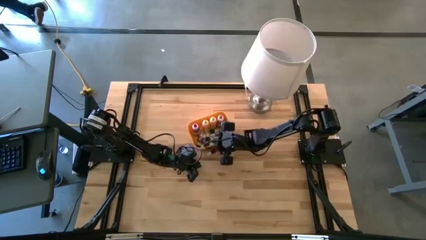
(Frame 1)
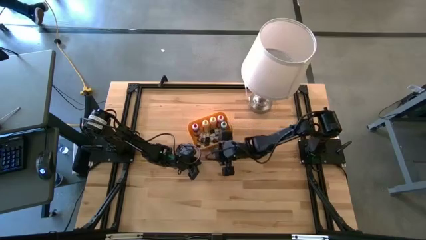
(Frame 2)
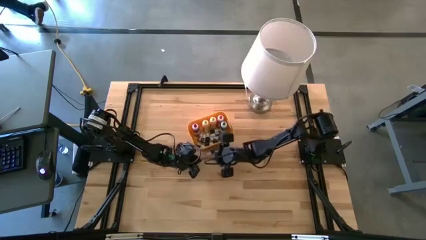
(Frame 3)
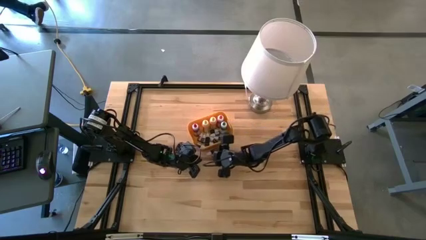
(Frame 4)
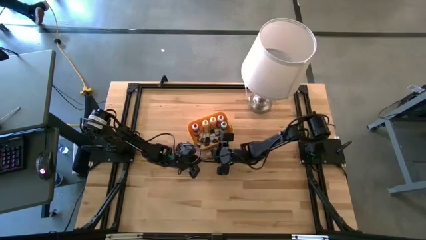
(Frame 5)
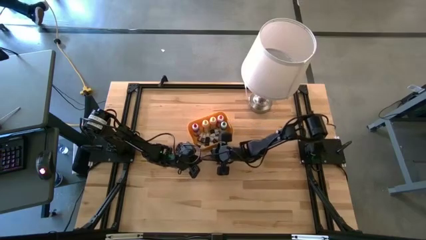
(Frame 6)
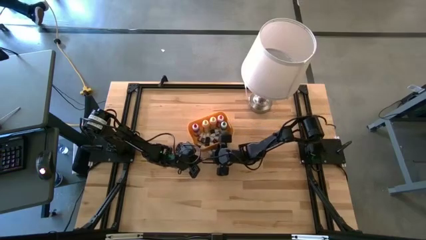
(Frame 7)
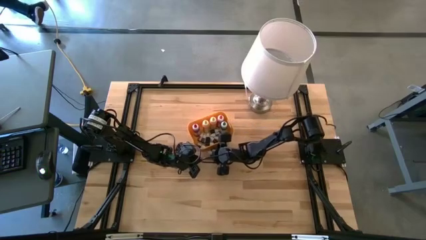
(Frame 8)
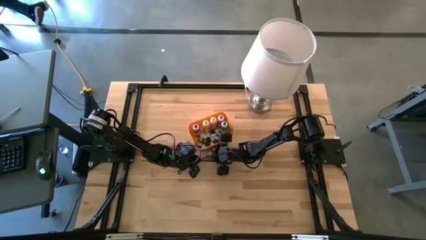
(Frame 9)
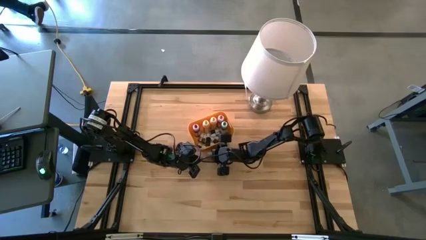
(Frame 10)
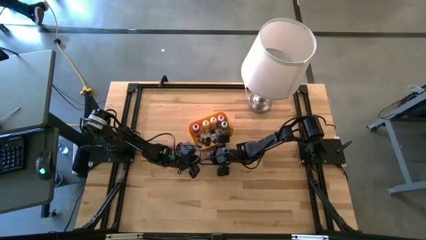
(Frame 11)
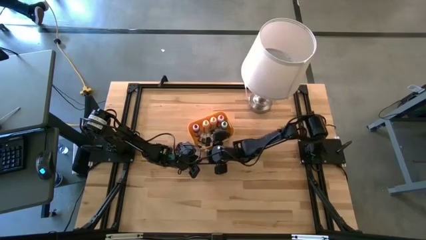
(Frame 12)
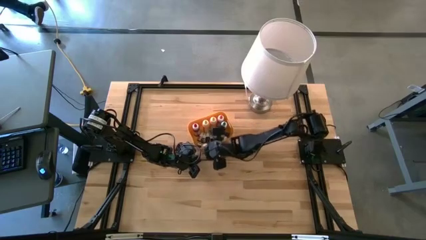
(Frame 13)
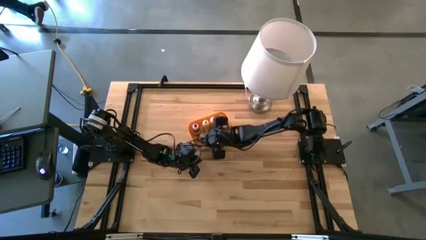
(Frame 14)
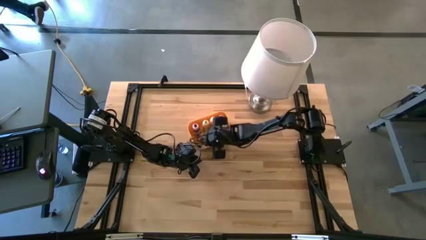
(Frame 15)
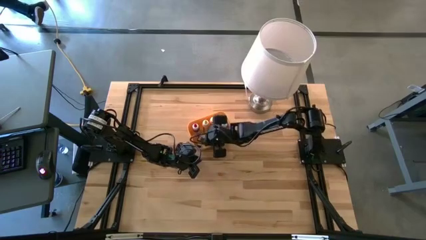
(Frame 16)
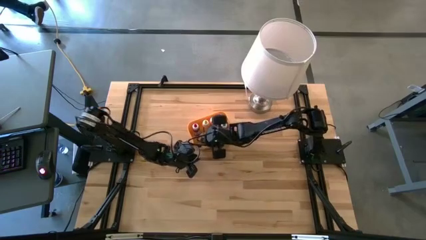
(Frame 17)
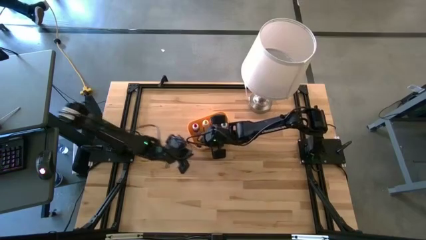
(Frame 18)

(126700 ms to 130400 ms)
Task: Pick & Place food coloring
Put the small red food coloring bottle into the yellow bin

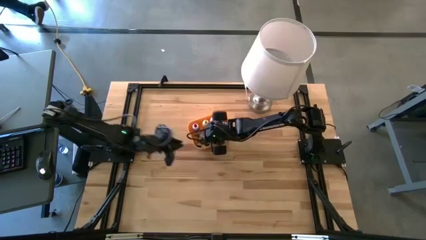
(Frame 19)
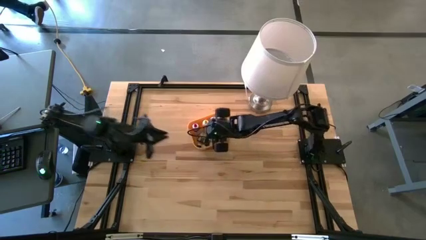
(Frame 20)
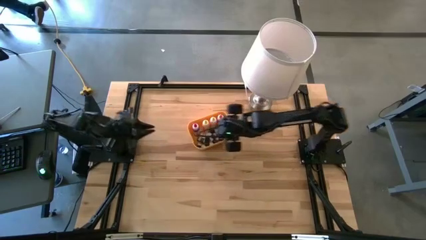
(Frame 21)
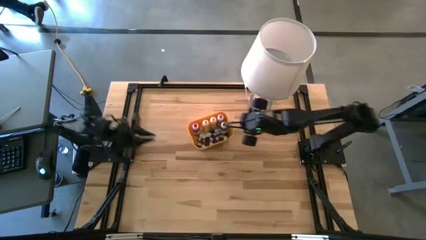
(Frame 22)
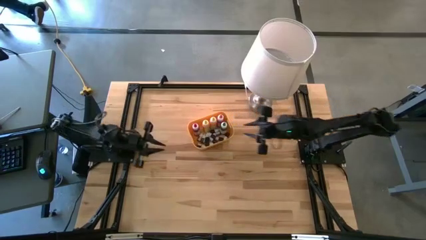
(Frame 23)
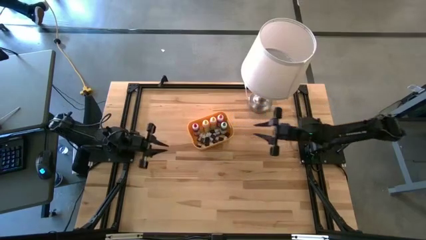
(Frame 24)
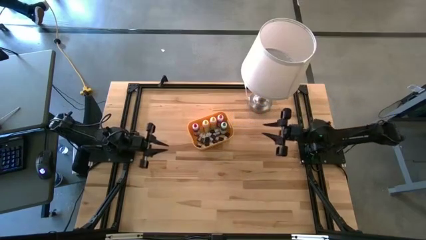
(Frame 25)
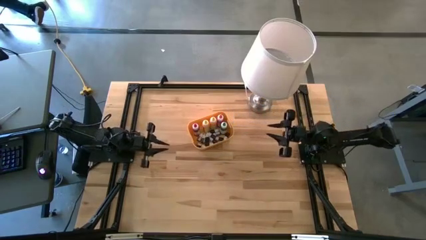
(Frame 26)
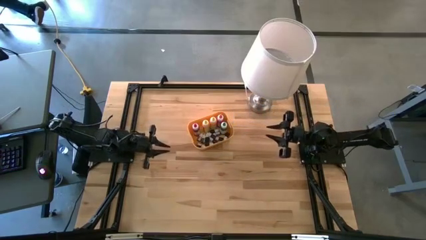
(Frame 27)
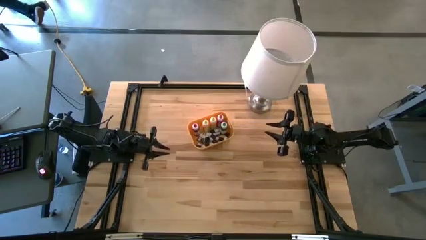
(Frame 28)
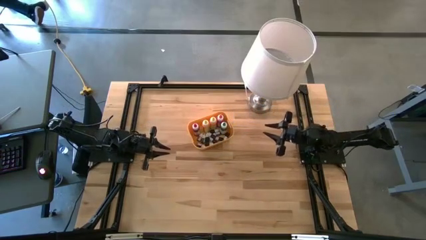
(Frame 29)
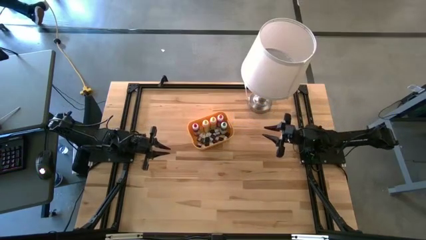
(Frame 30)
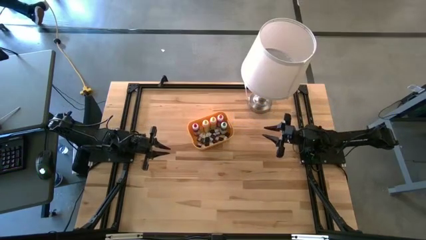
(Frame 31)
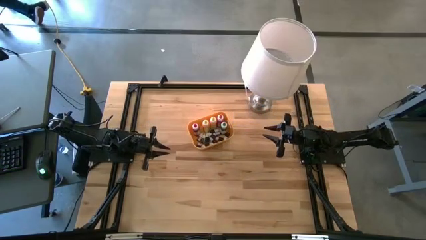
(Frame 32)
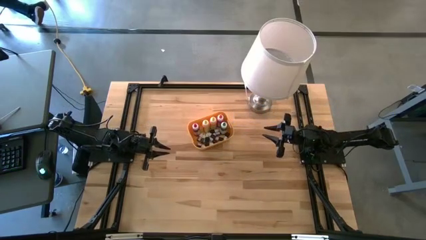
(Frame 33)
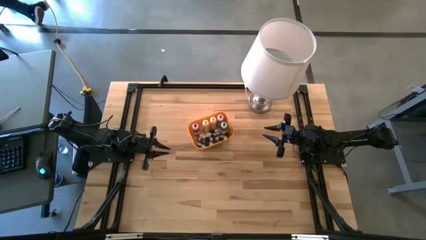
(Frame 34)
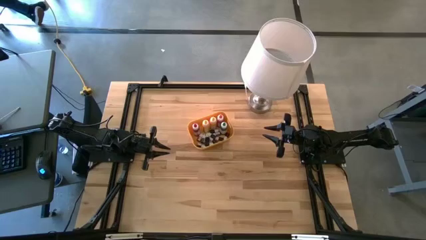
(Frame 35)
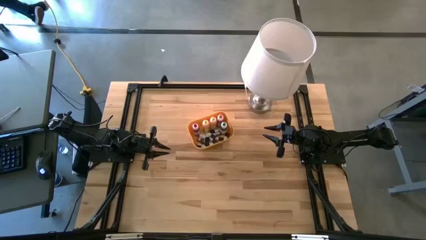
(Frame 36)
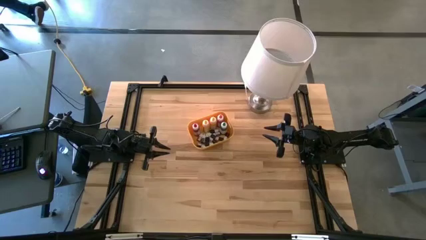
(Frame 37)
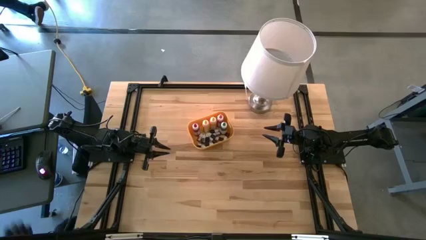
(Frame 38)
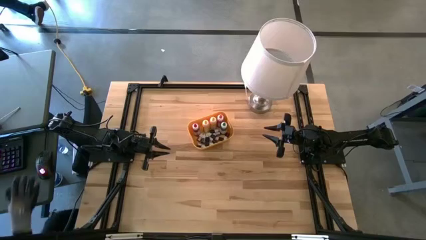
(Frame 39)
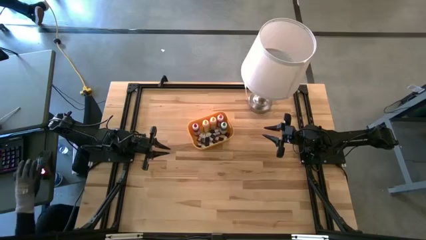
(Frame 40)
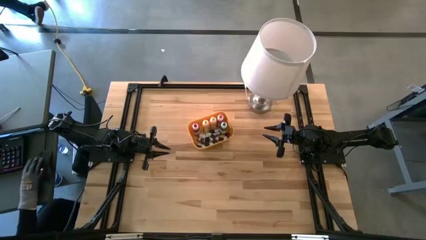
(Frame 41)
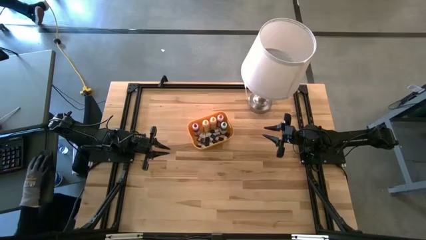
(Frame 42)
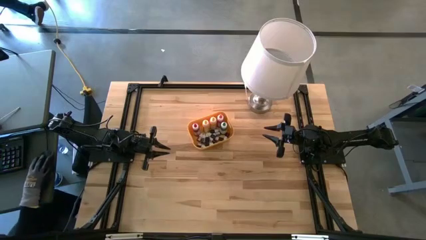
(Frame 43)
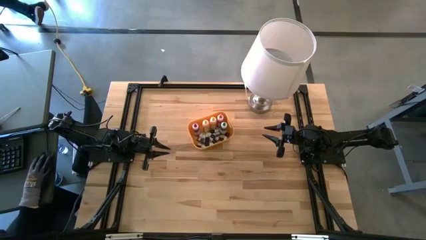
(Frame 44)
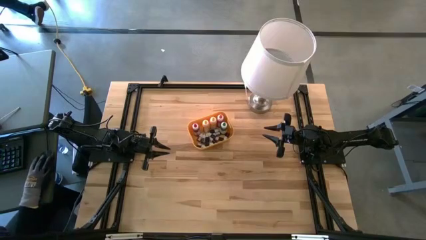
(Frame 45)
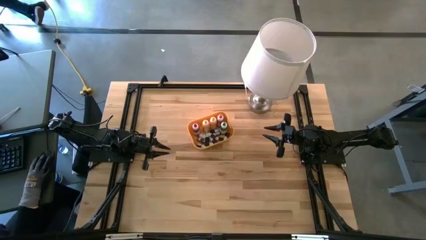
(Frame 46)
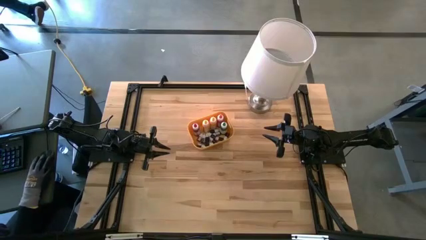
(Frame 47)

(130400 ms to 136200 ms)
Return to Home Position

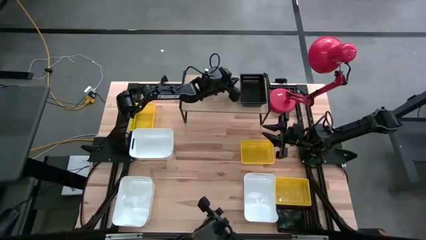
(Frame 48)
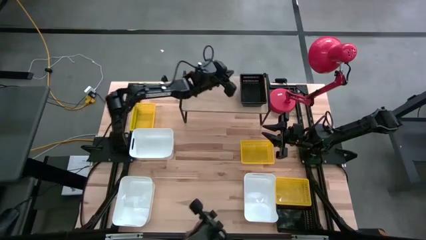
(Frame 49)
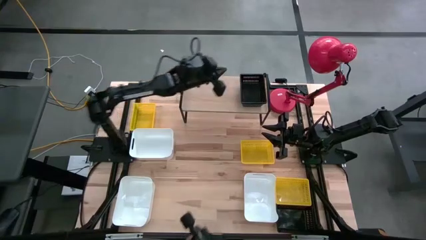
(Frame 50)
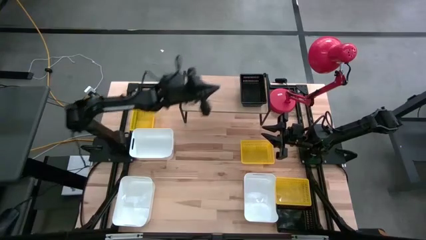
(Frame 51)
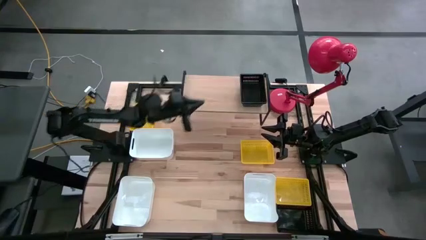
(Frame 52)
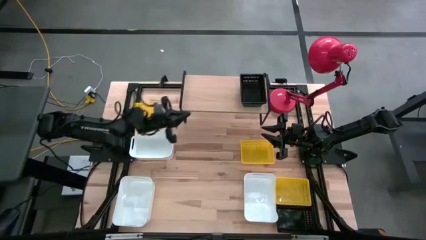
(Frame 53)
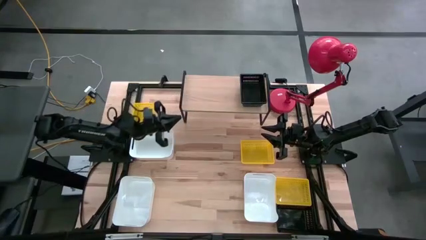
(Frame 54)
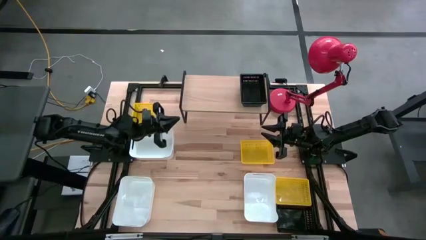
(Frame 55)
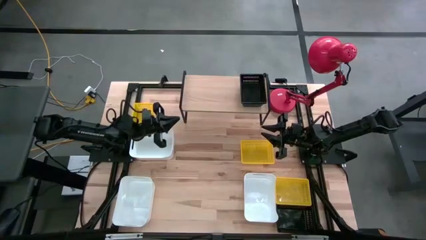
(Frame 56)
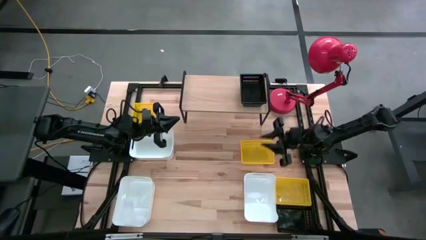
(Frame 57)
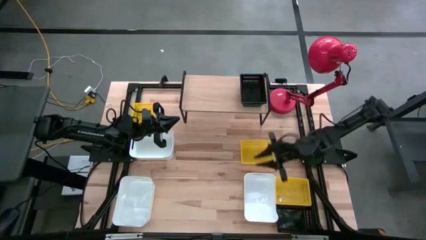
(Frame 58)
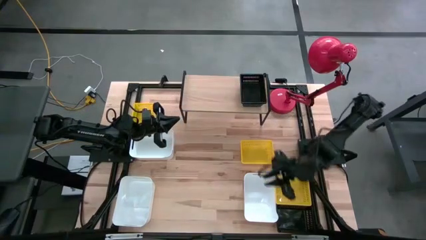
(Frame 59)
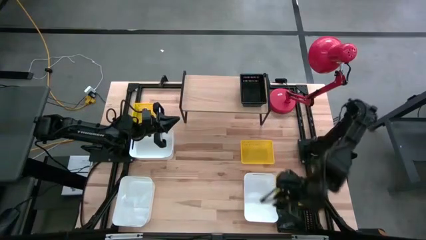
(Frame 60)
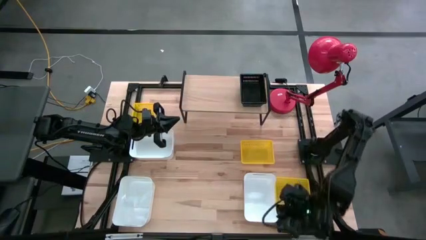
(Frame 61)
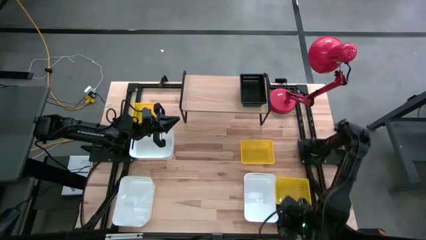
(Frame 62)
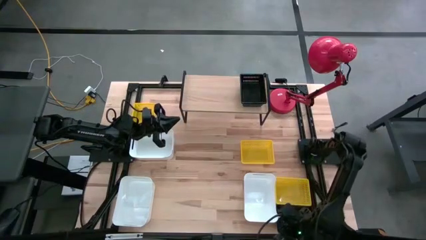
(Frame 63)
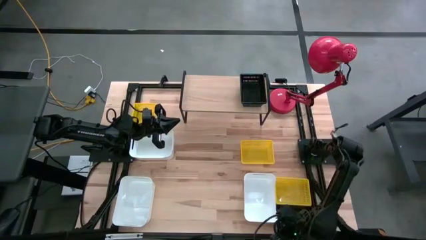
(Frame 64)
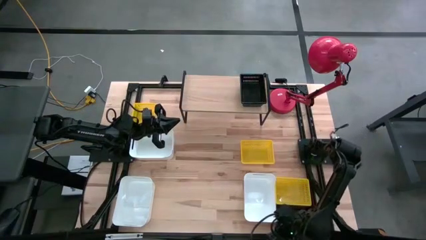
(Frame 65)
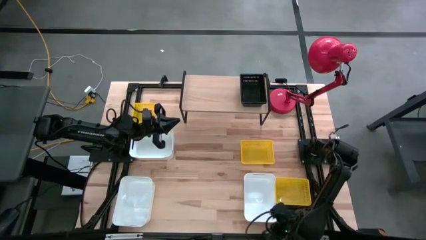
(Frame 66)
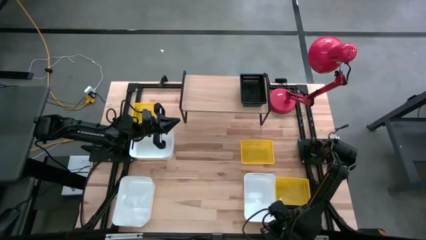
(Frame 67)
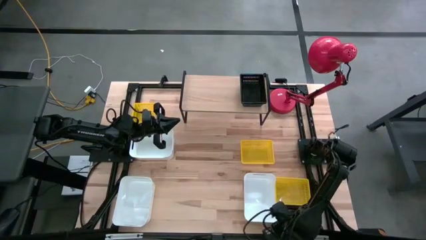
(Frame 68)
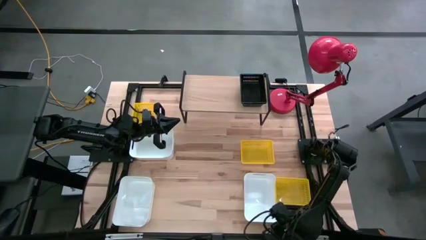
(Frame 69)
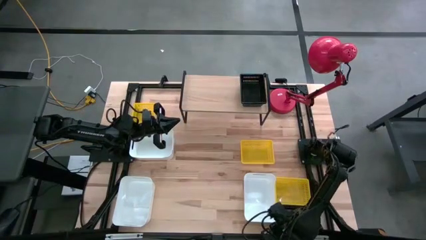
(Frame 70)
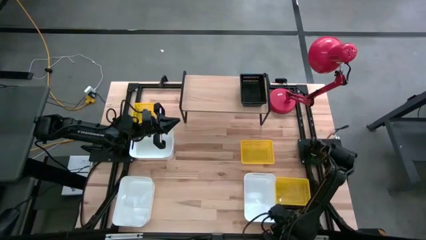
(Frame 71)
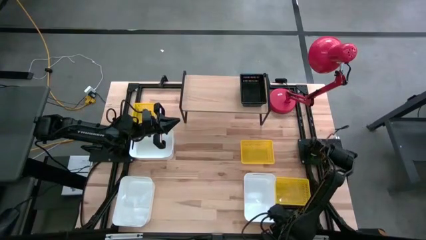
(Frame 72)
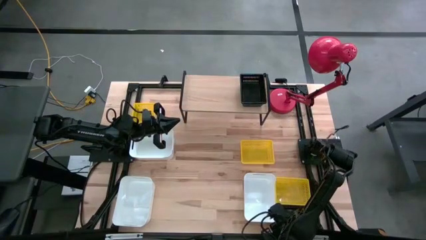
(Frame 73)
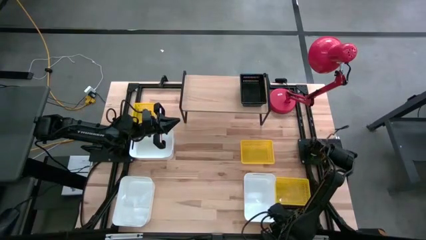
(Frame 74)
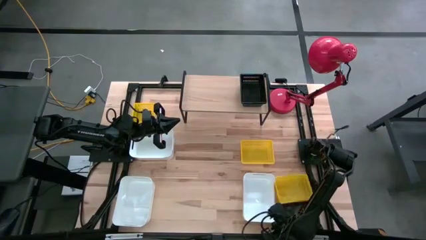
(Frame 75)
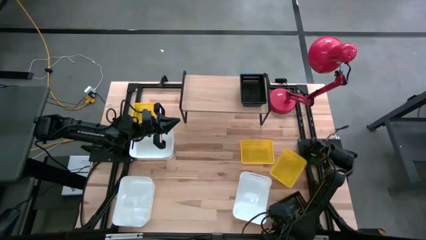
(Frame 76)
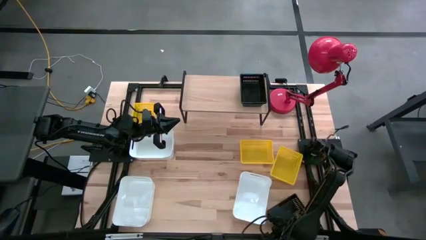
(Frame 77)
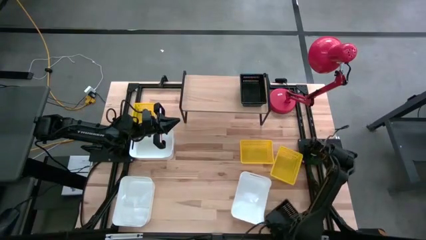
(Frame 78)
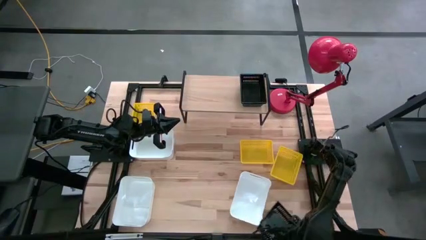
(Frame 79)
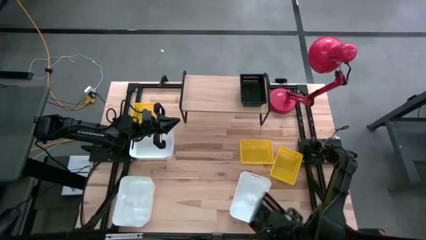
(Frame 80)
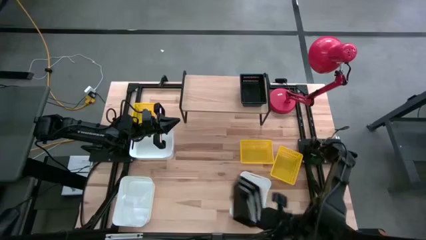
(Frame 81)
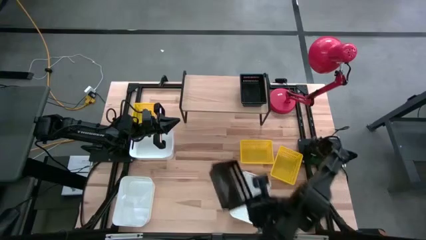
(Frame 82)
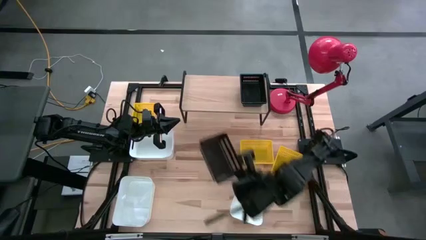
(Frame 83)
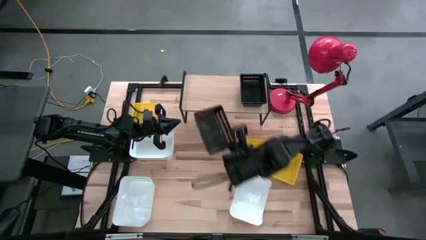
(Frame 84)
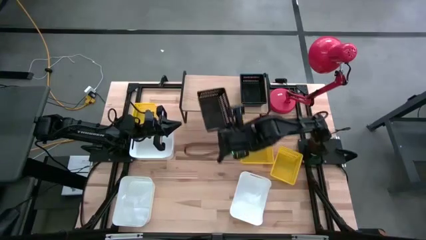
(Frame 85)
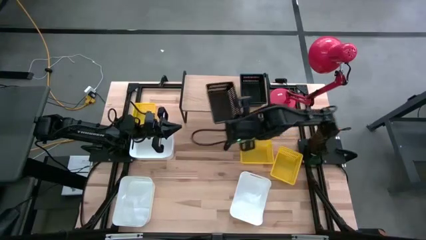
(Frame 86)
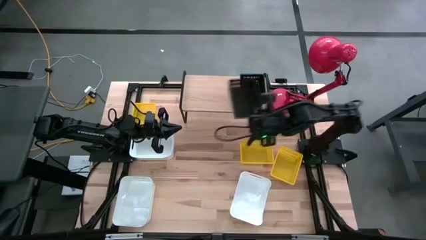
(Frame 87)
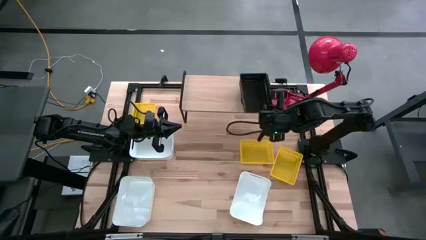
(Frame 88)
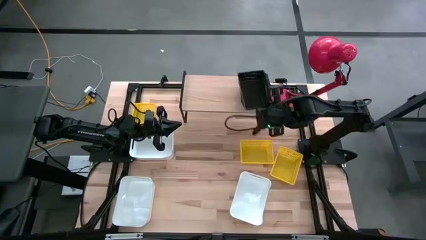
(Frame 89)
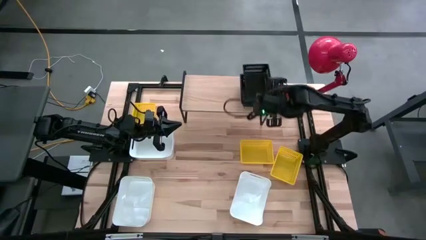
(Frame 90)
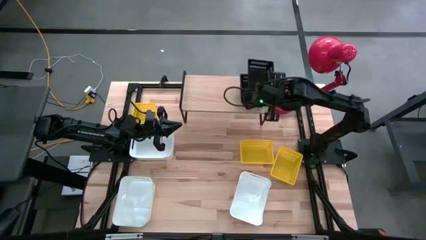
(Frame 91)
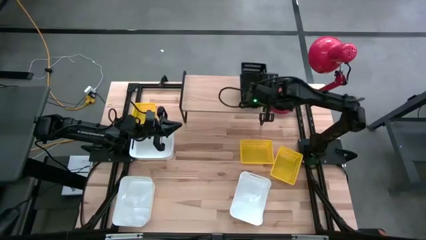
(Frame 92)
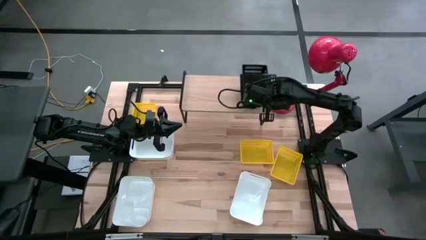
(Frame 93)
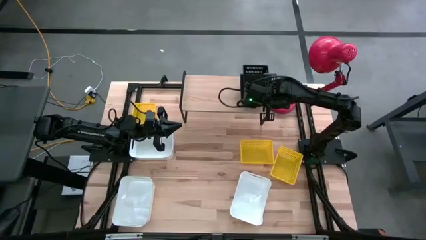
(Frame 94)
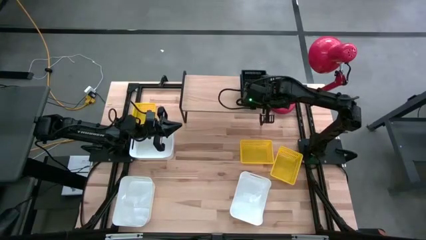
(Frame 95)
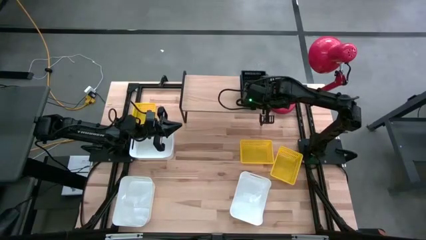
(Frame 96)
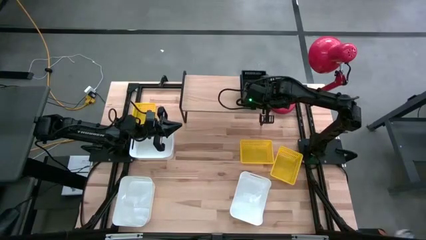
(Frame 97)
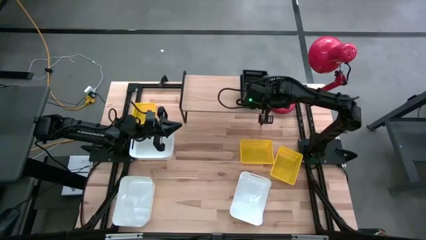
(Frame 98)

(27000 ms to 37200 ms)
Task: Stack baskets on shelf by color
Stack the black bin on the other black bin on the shelf
